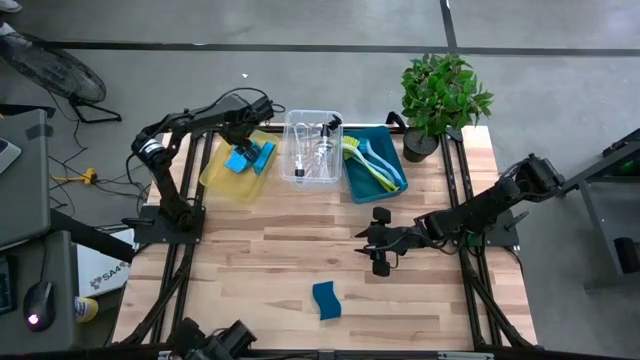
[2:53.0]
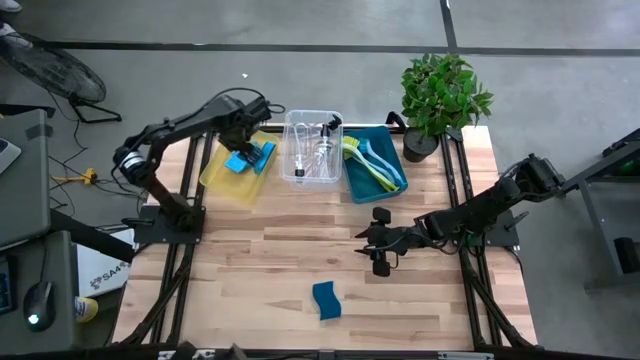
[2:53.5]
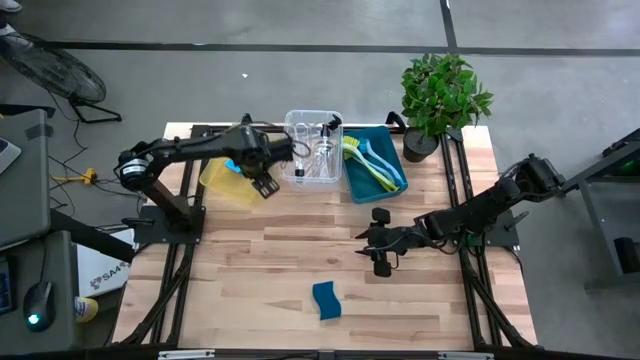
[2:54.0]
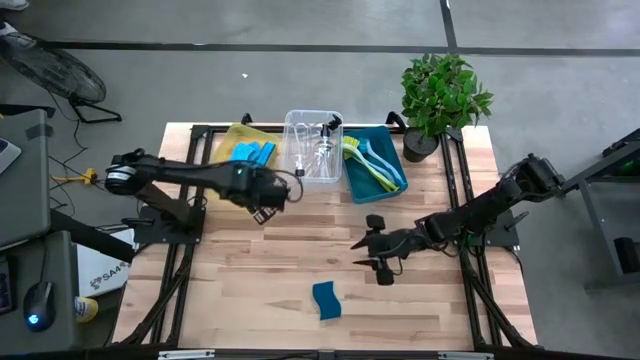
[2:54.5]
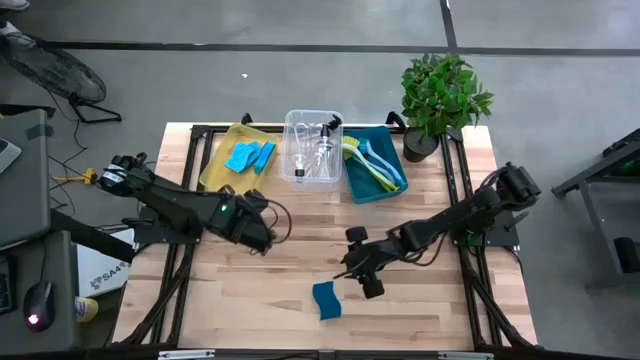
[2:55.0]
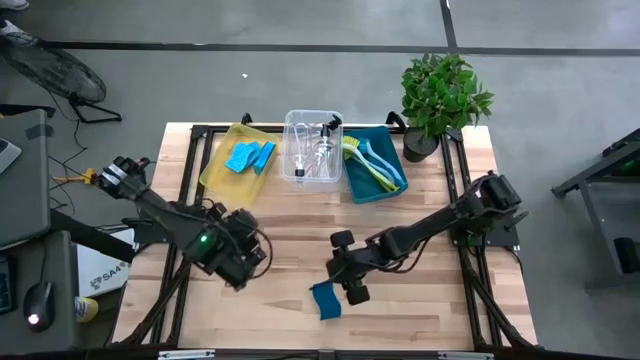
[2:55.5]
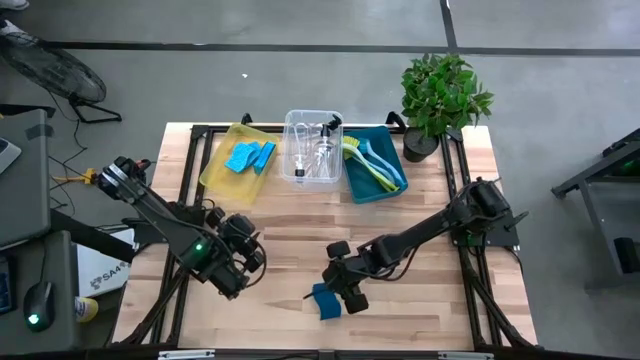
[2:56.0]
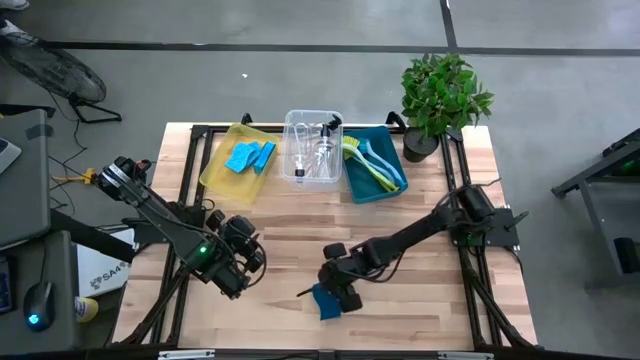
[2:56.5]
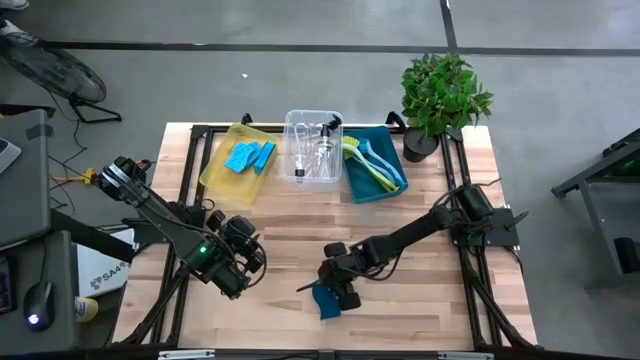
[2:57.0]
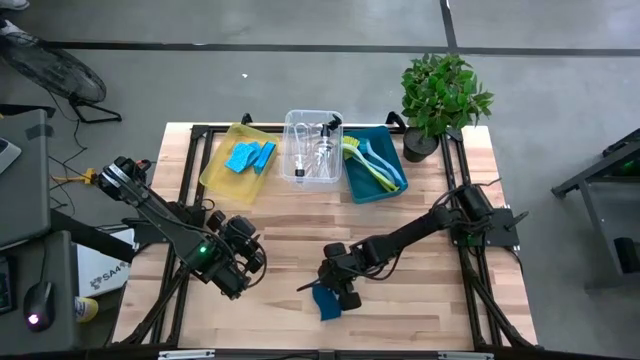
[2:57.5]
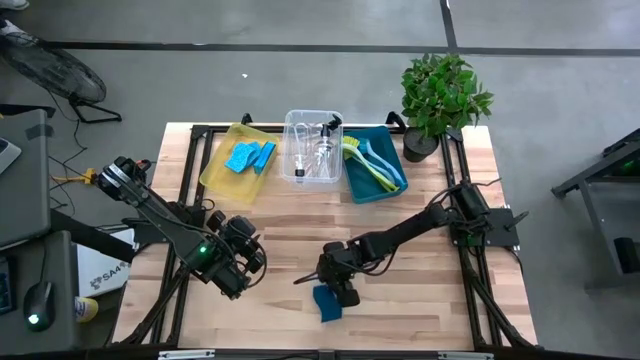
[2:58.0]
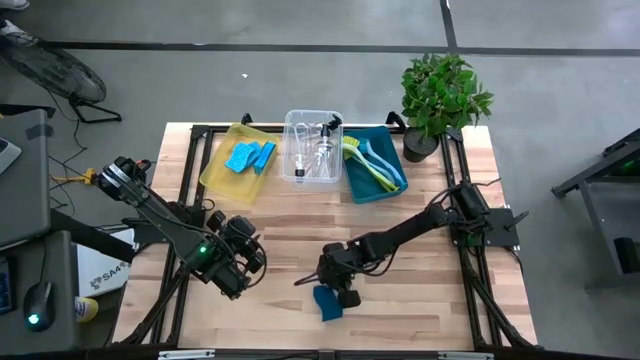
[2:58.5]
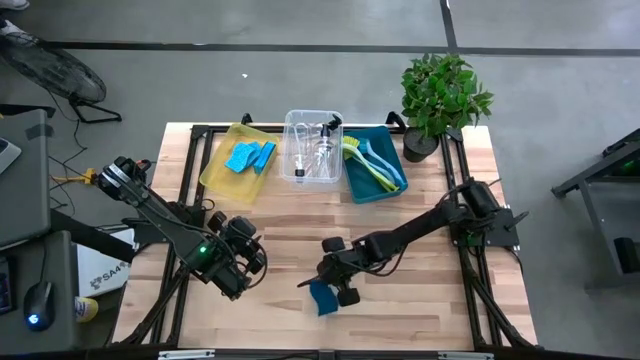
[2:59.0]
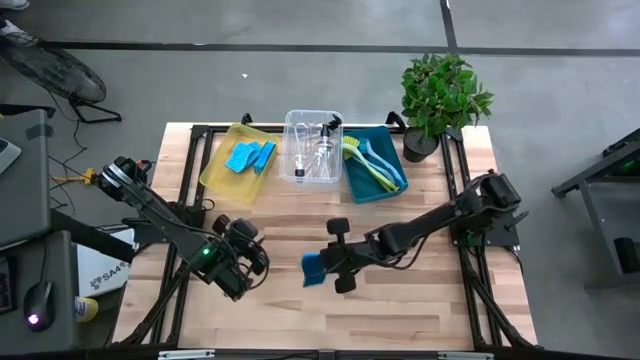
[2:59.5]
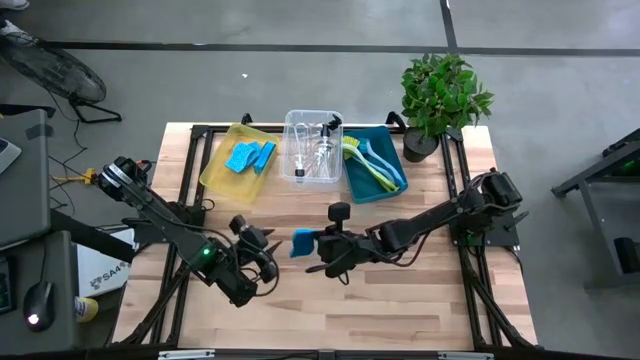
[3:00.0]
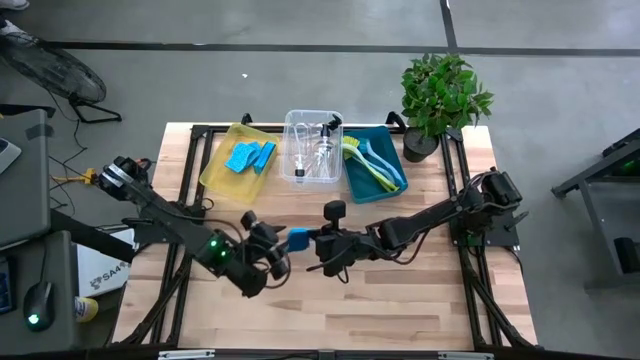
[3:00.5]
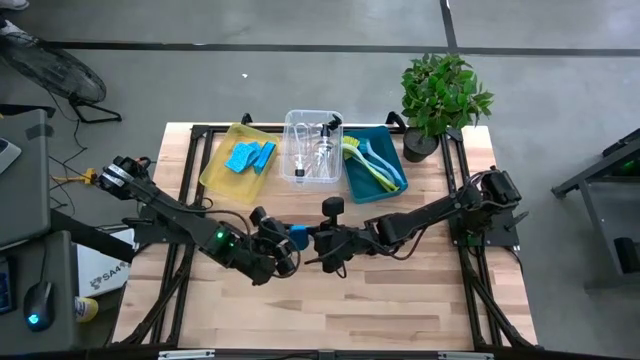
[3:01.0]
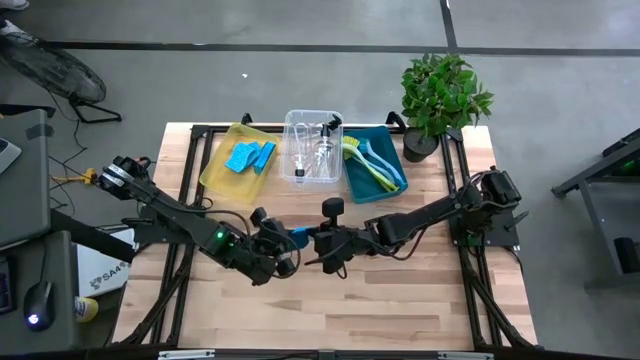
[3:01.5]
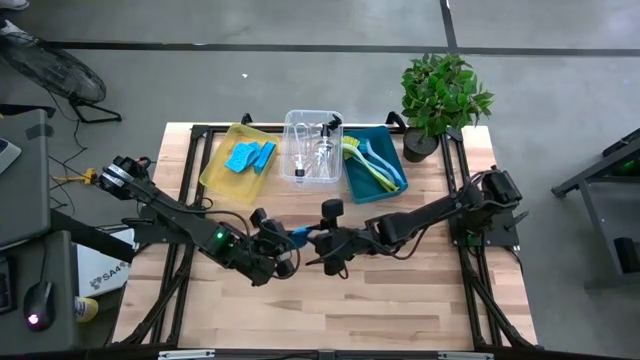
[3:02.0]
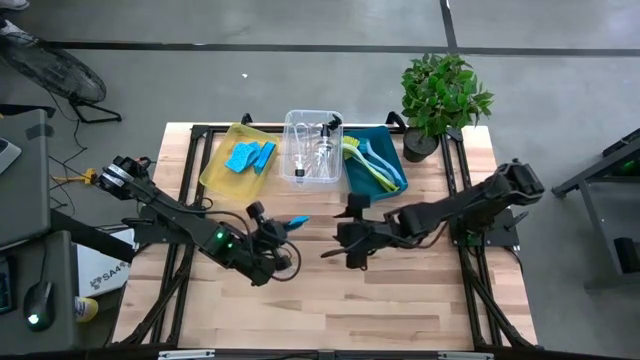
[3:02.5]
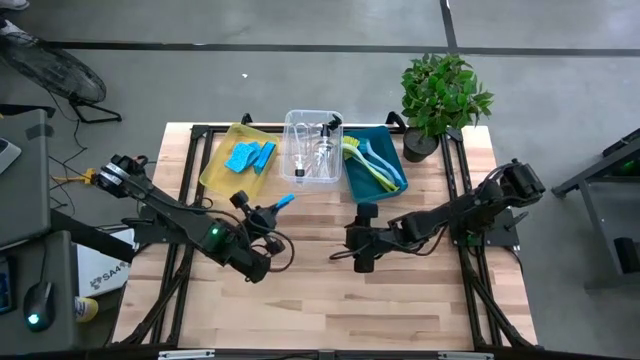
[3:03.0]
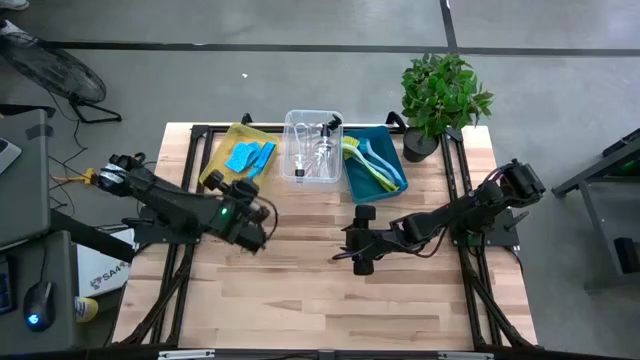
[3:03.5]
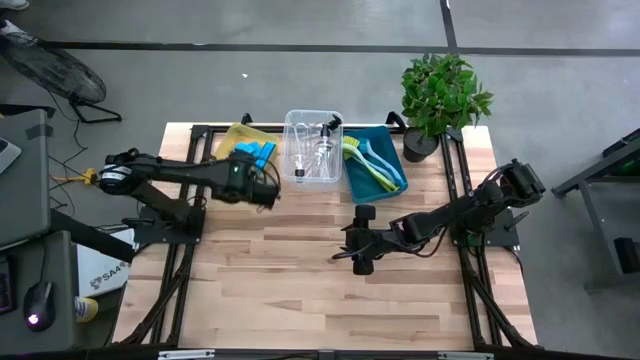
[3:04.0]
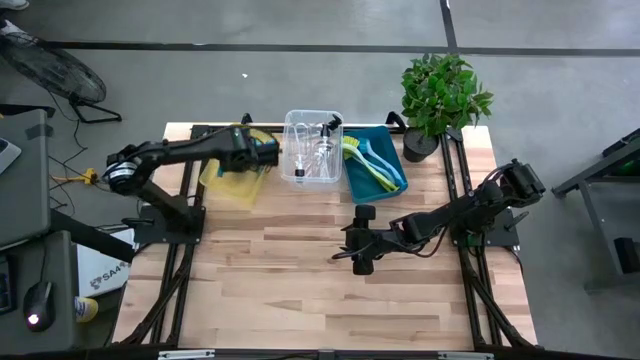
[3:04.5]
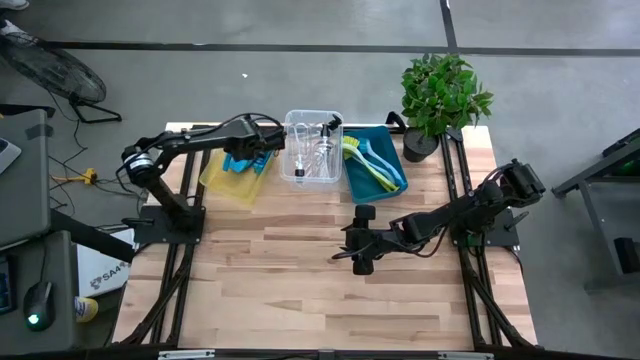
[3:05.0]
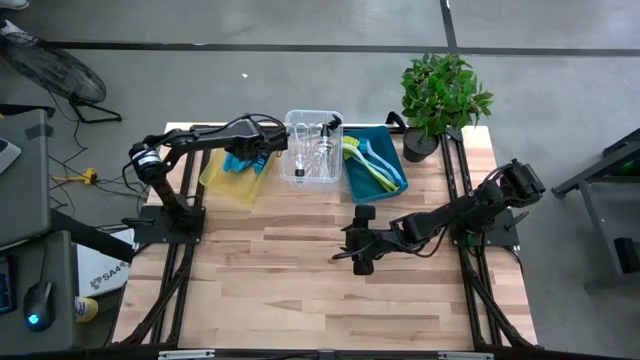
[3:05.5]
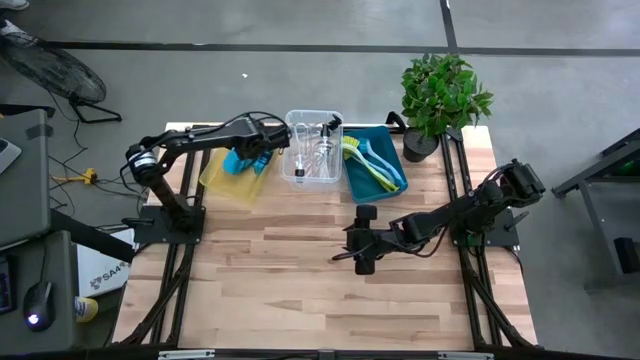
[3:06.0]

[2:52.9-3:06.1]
Task: Pick & Place Kitchen Sink Supplies
Put the blue sponge into the yellow bin

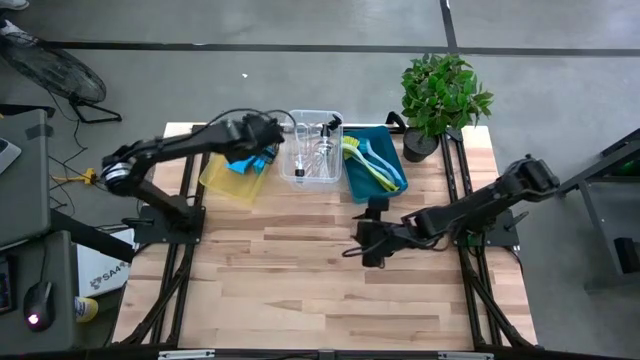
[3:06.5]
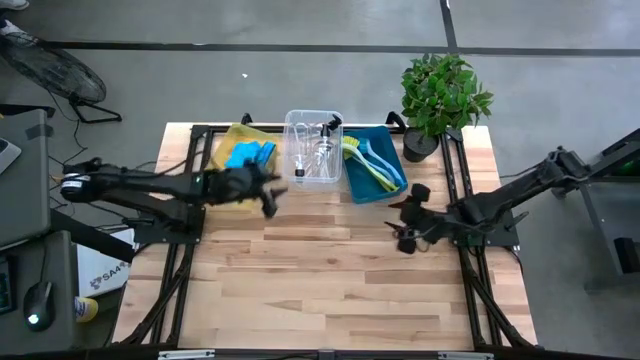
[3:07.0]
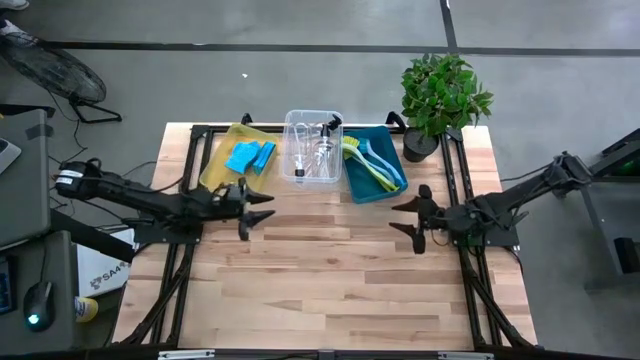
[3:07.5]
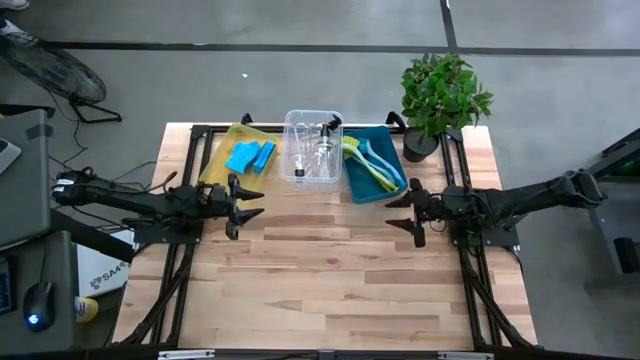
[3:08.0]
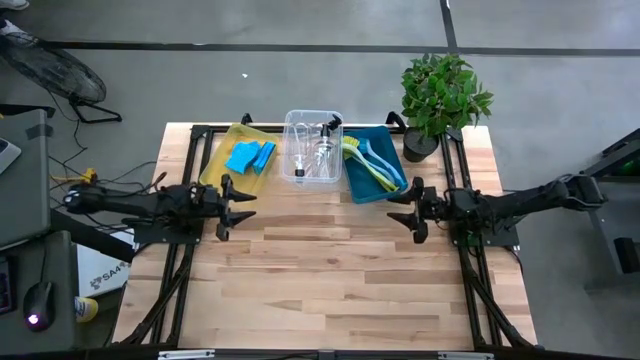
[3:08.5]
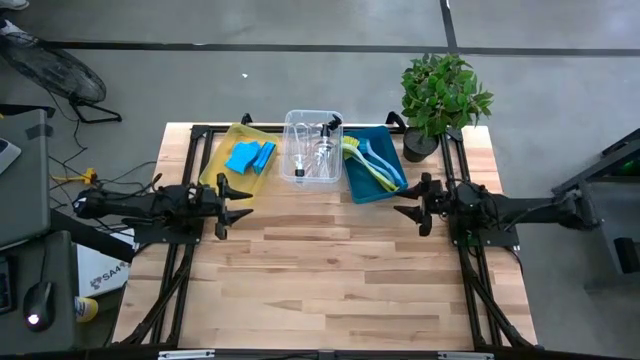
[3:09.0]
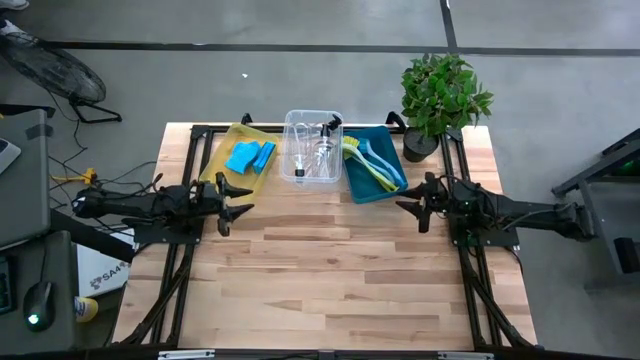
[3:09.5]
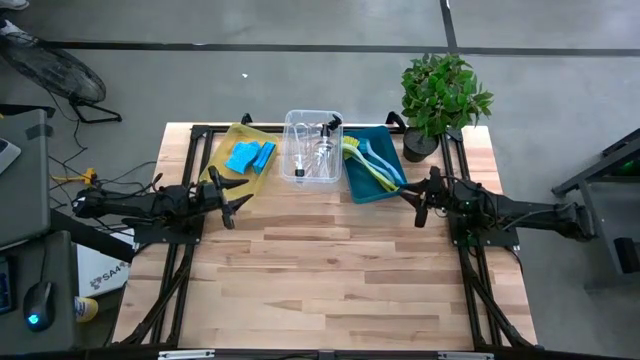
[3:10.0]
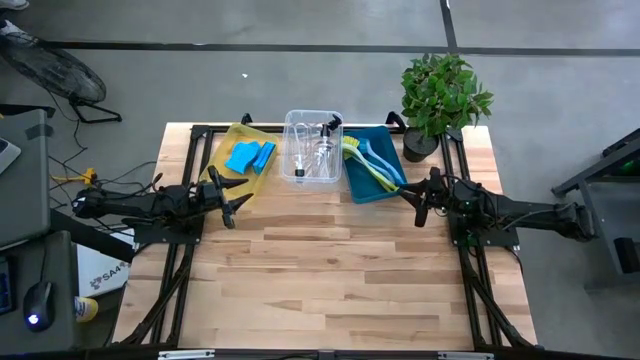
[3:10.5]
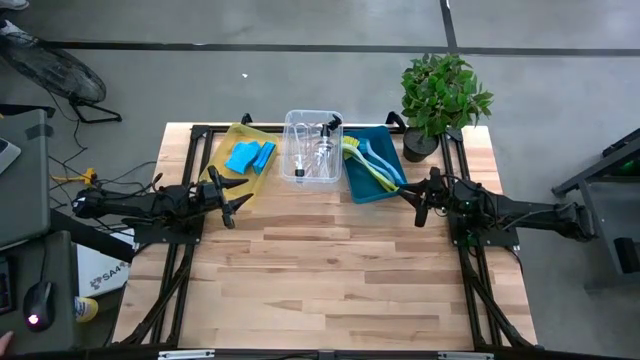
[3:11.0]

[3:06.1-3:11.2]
Return to Home Position
